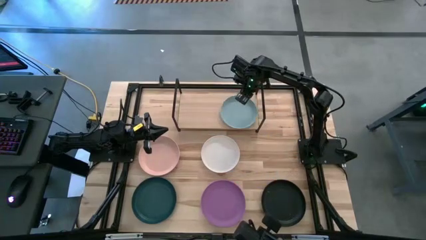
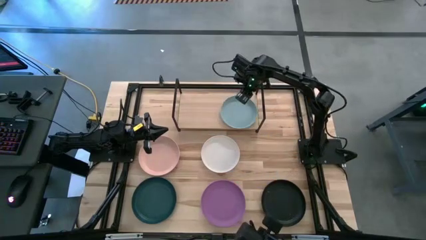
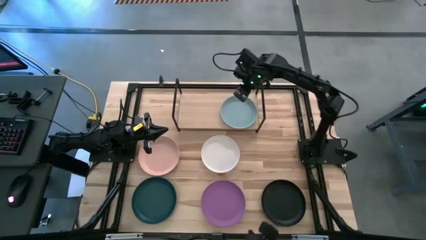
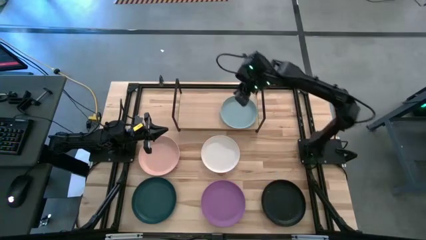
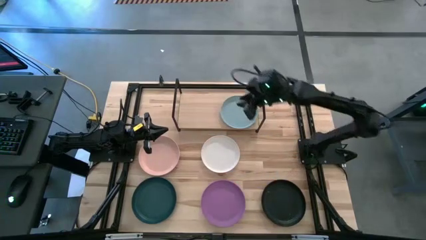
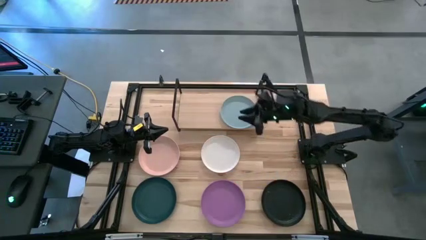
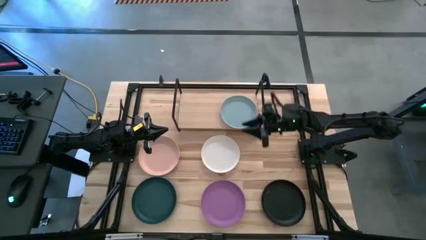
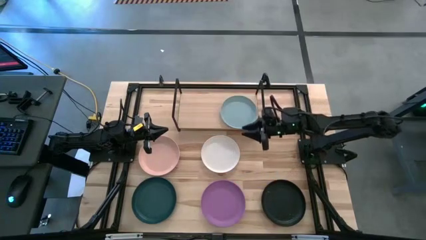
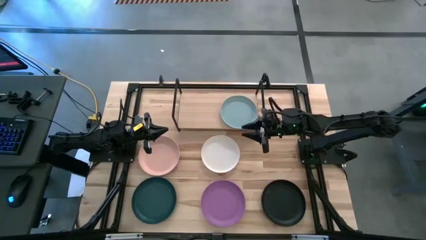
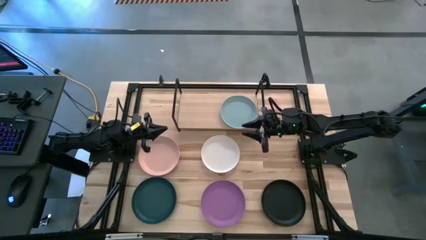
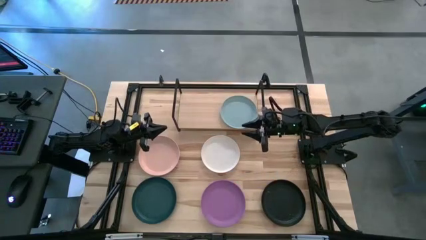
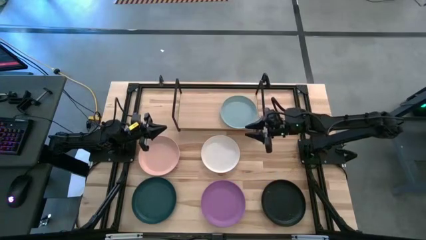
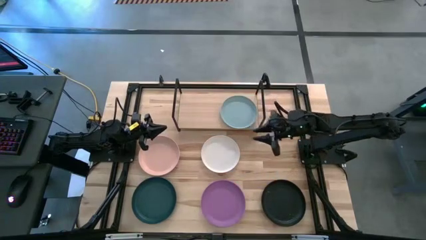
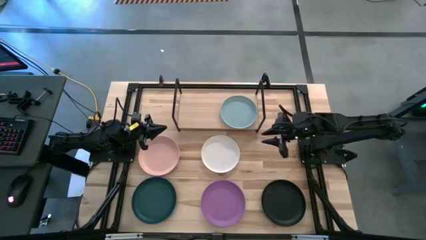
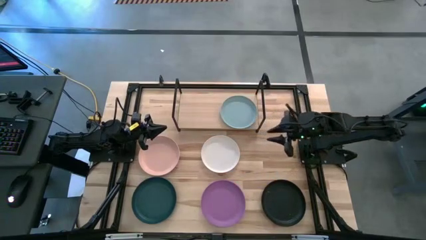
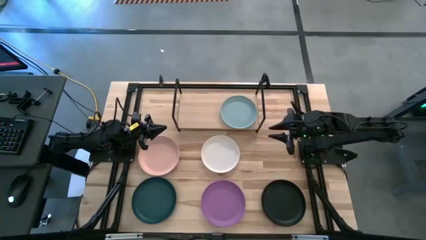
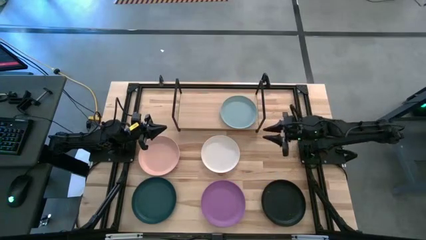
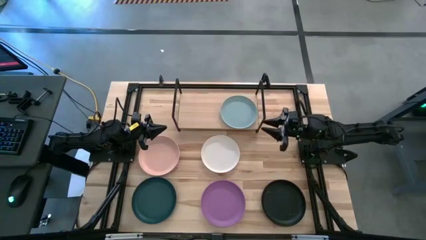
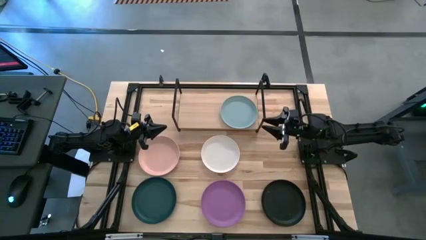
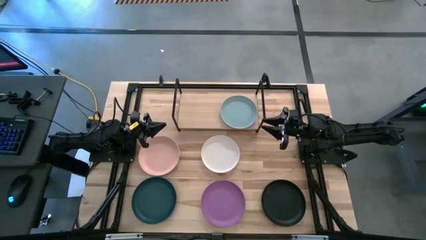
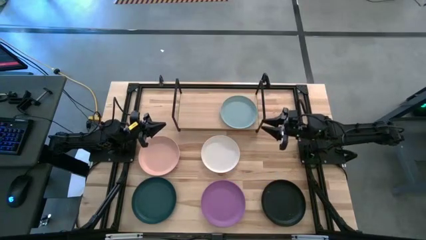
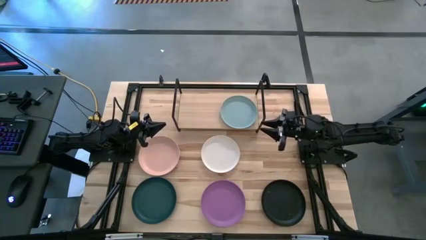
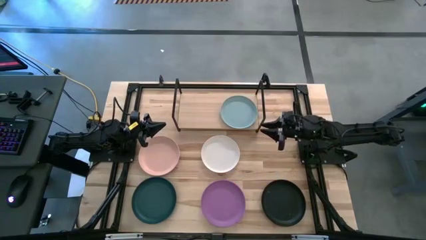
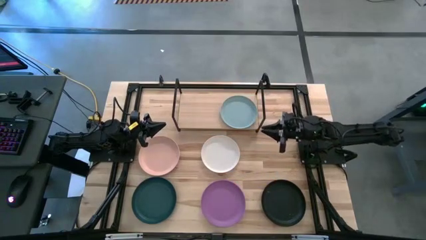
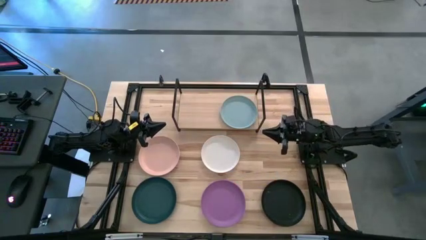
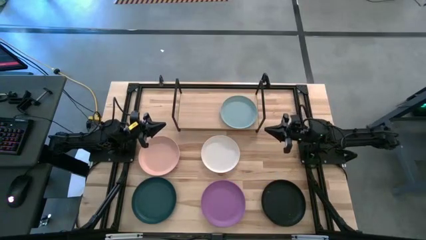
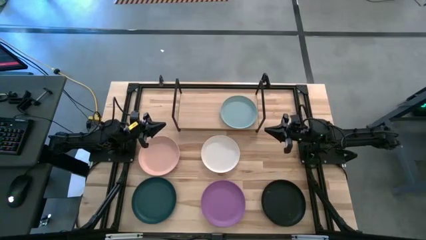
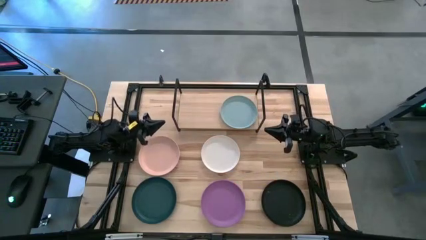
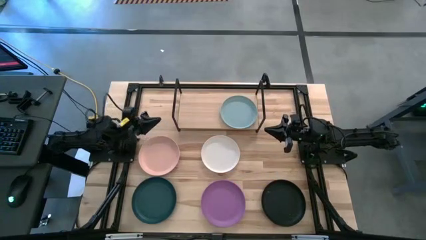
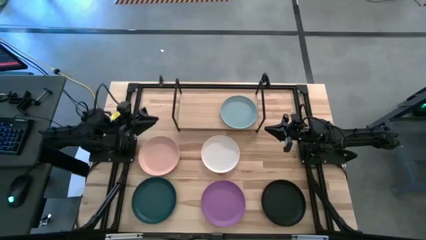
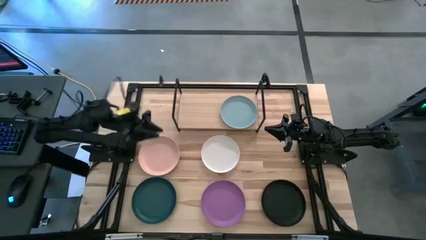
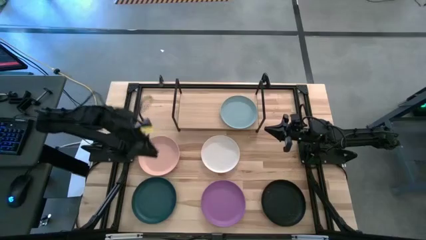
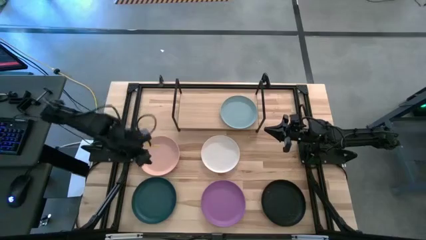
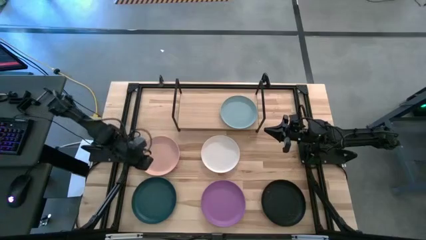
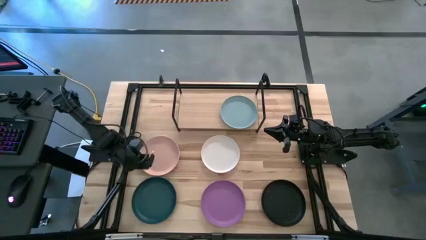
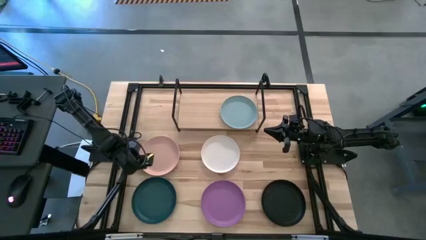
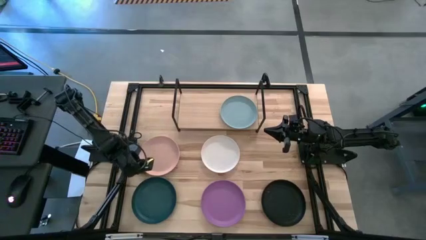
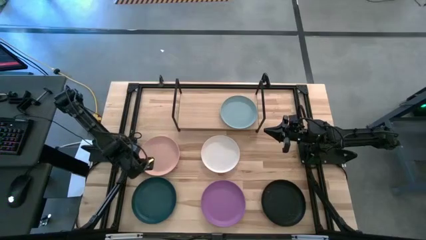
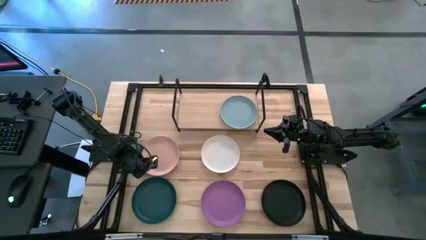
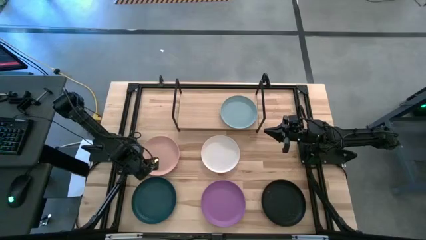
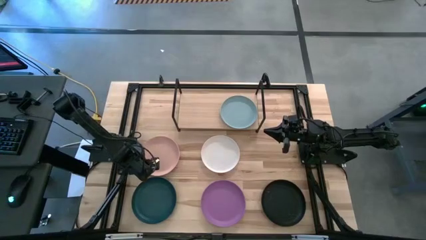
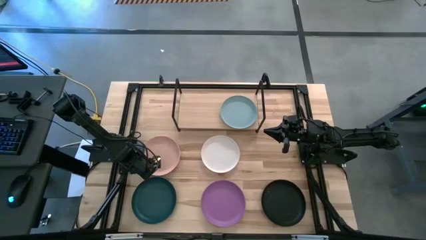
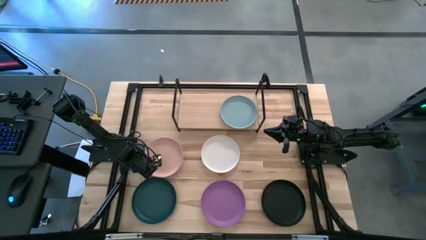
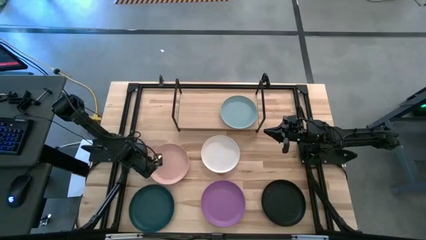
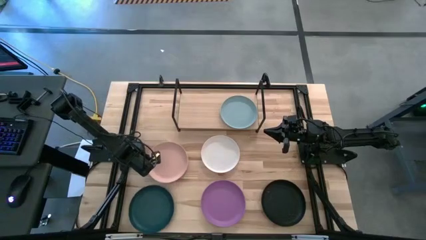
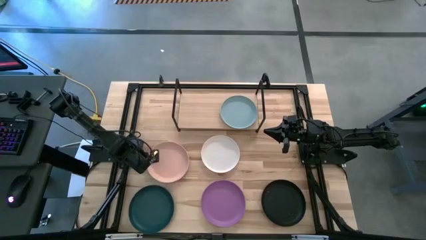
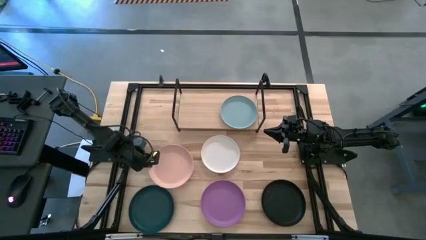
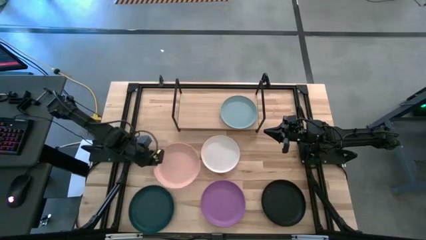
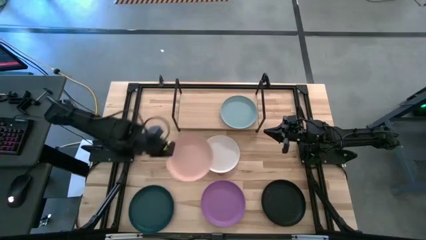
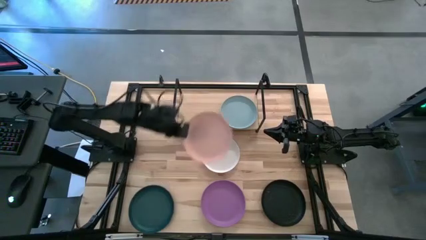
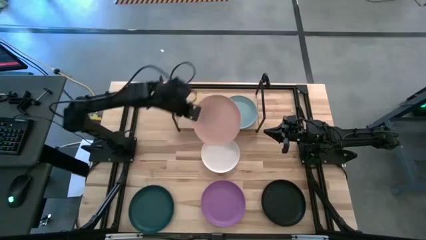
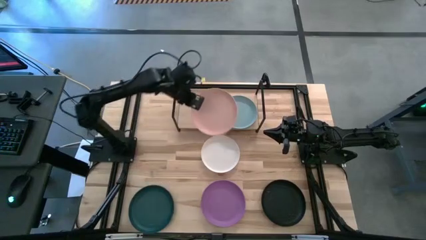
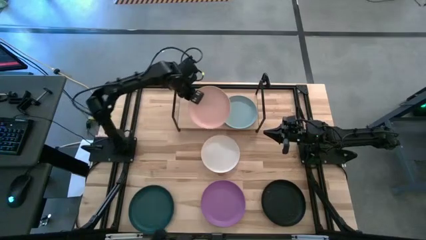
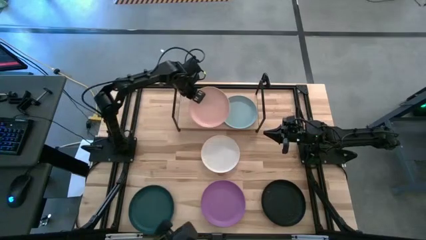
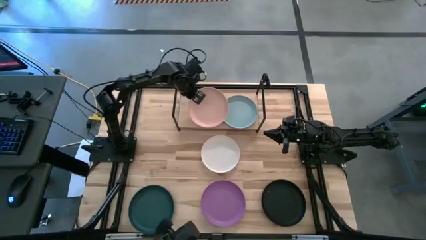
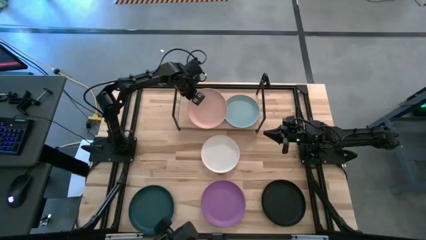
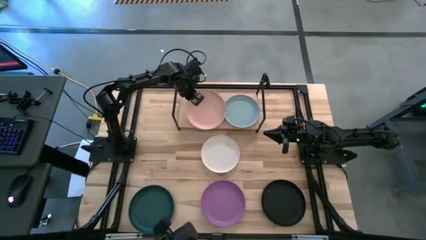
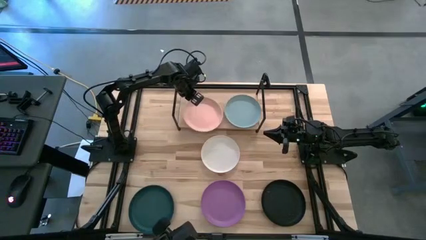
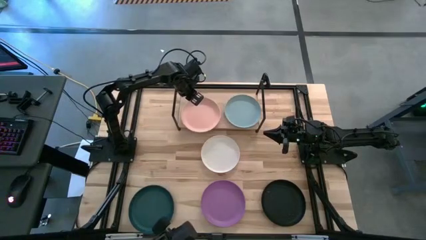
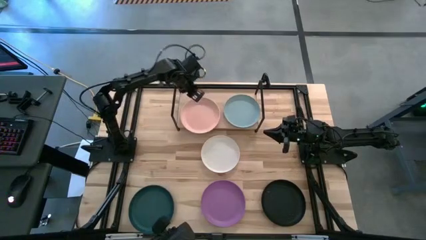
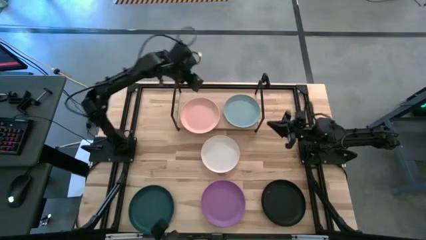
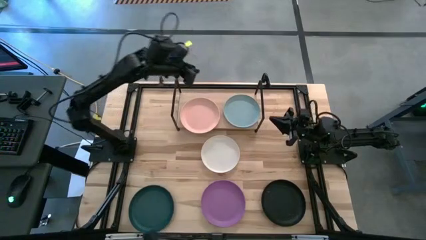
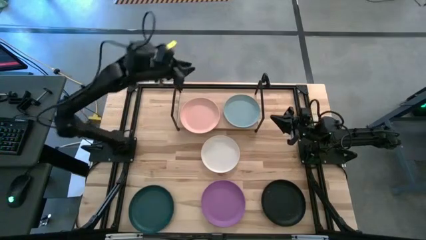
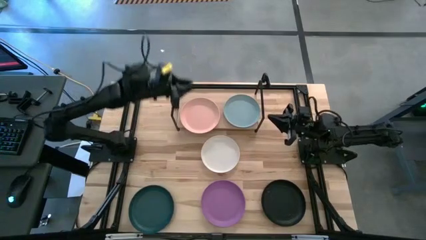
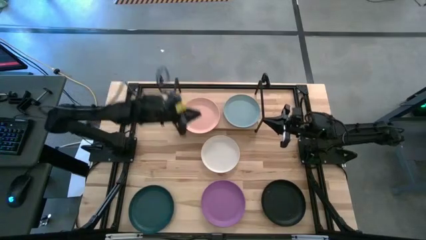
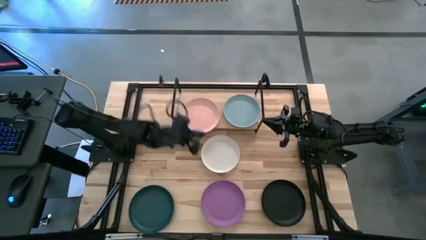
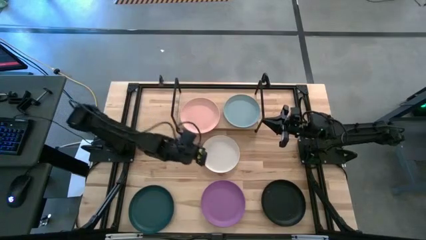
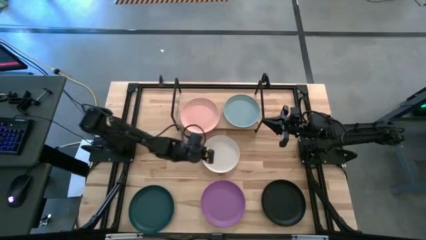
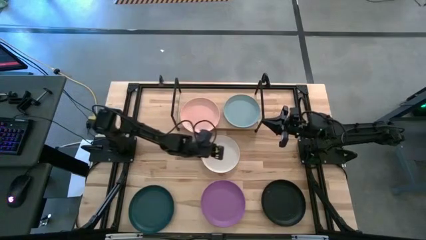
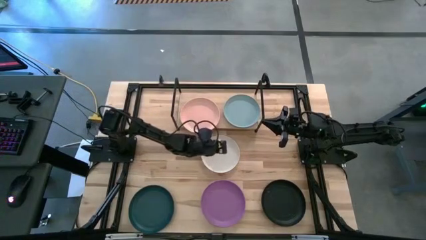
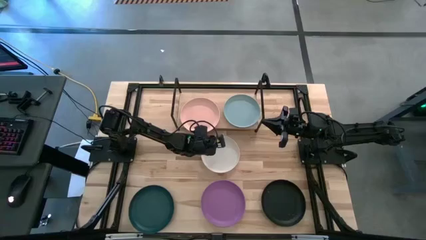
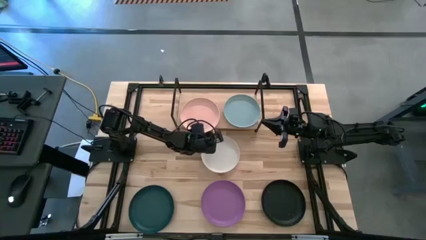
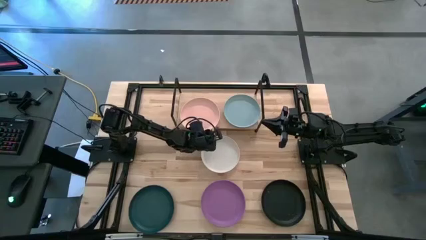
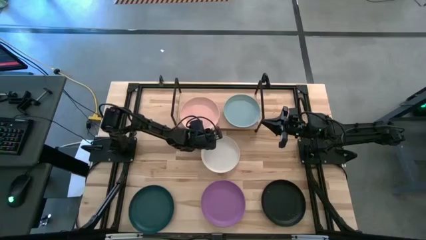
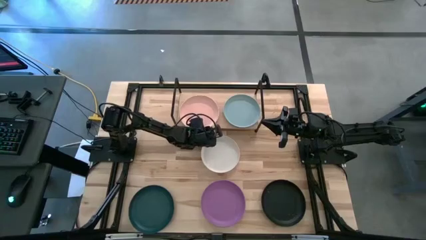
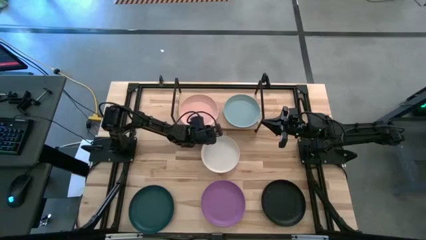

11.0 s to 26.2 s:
Task: Place and stack plates onto a shelf
Put the pink plate on the shelf
